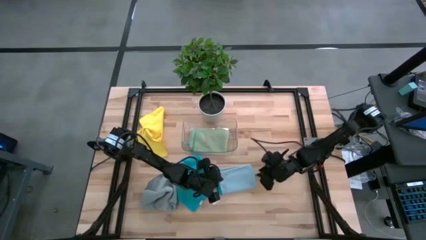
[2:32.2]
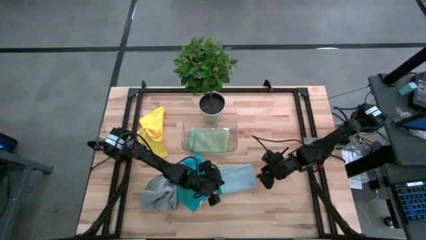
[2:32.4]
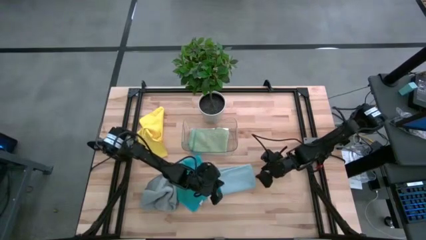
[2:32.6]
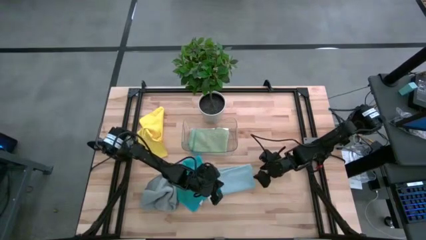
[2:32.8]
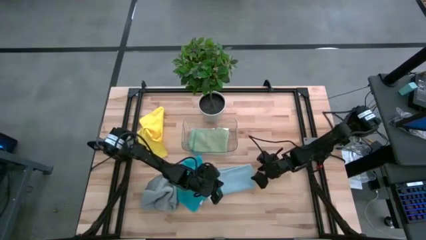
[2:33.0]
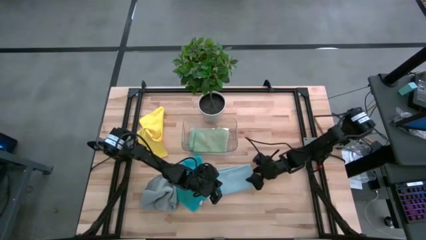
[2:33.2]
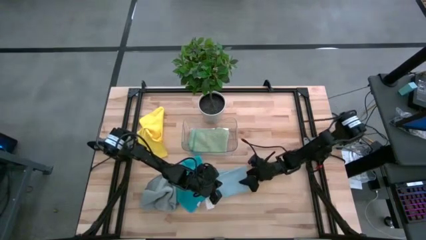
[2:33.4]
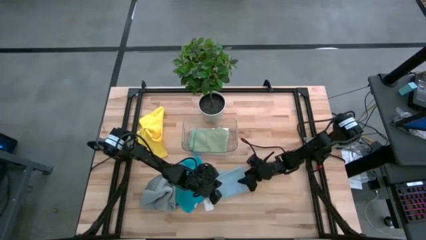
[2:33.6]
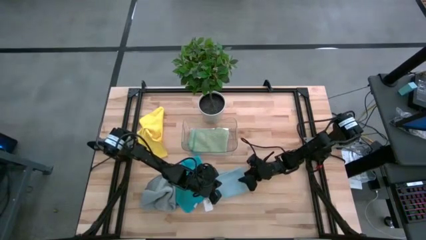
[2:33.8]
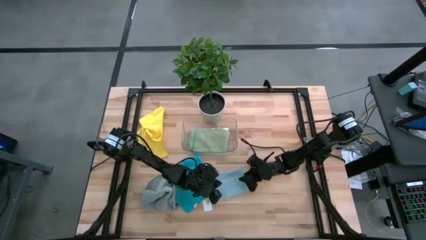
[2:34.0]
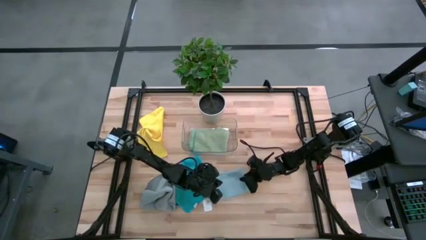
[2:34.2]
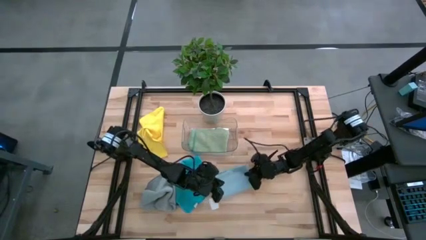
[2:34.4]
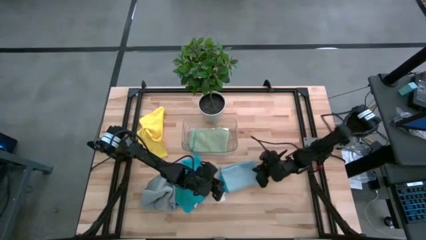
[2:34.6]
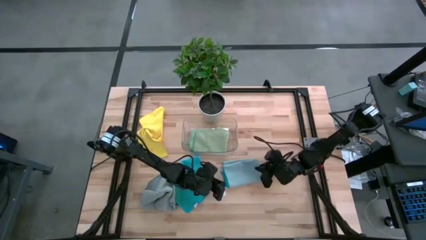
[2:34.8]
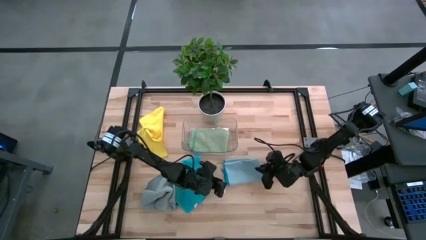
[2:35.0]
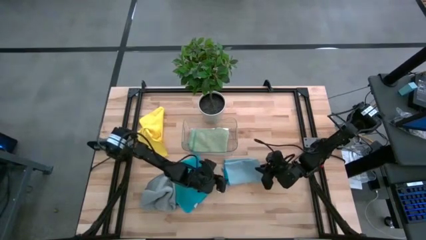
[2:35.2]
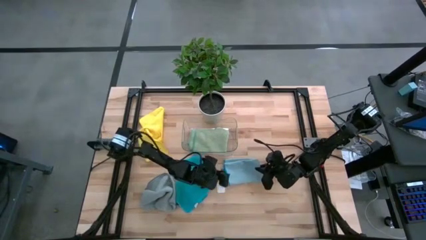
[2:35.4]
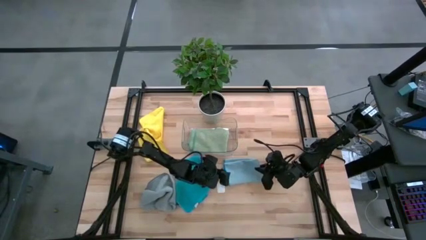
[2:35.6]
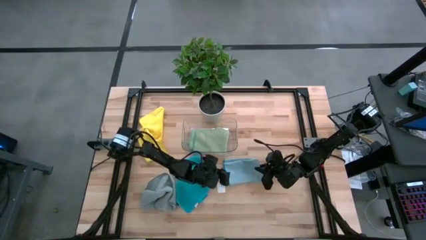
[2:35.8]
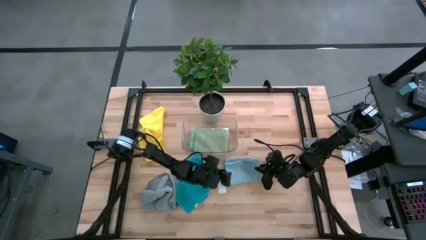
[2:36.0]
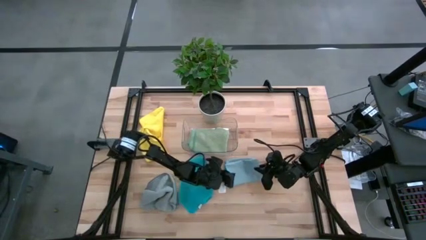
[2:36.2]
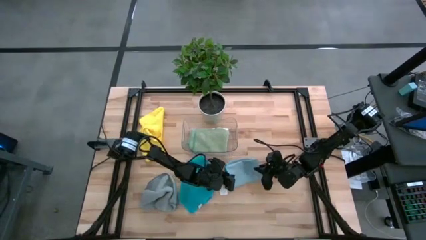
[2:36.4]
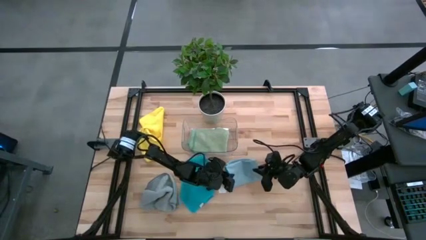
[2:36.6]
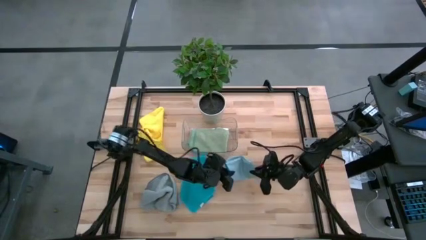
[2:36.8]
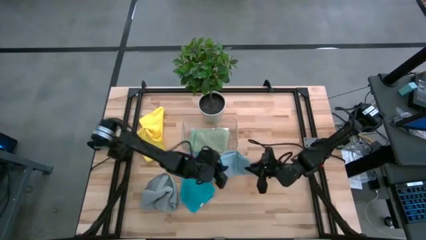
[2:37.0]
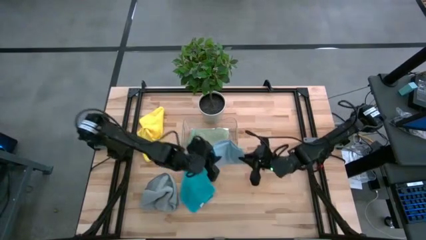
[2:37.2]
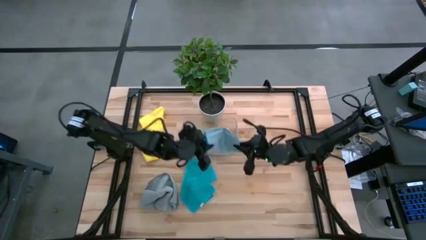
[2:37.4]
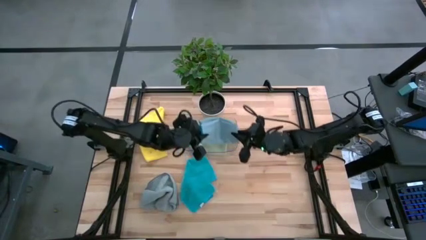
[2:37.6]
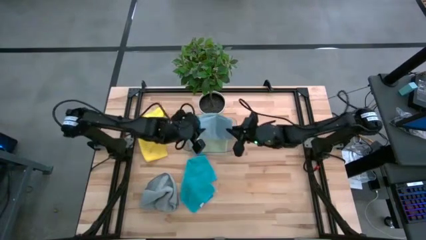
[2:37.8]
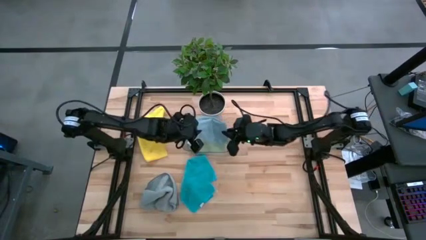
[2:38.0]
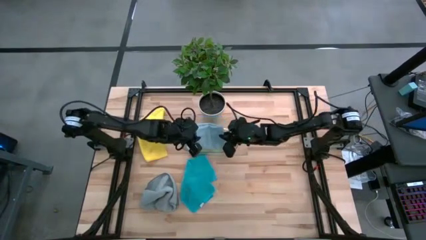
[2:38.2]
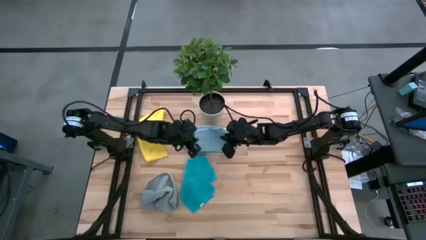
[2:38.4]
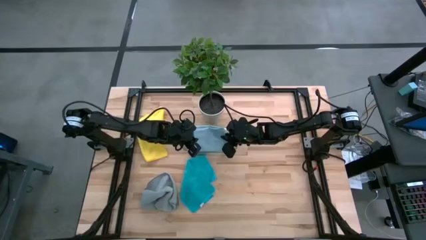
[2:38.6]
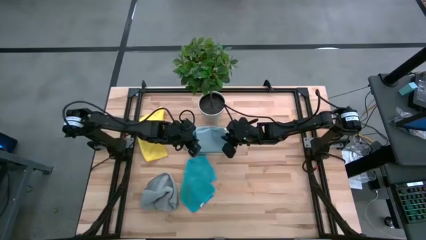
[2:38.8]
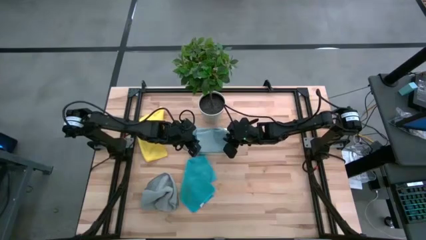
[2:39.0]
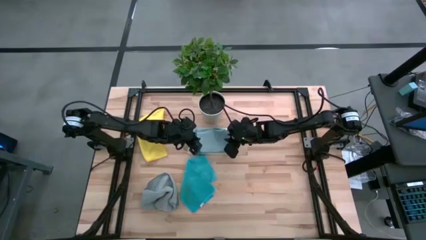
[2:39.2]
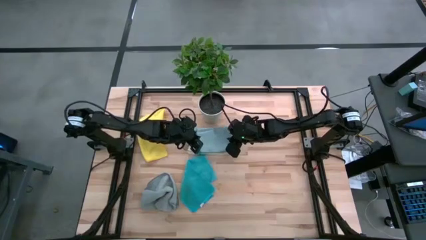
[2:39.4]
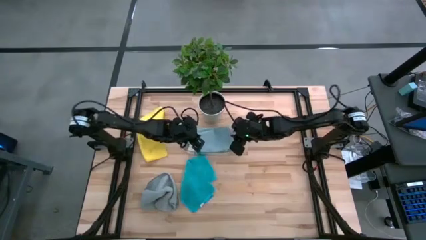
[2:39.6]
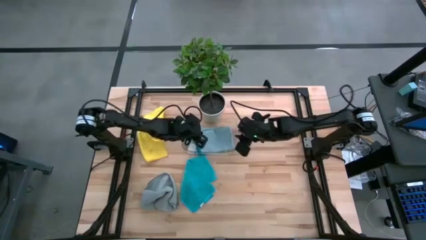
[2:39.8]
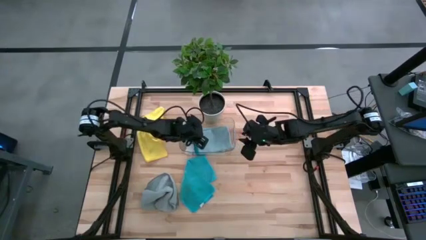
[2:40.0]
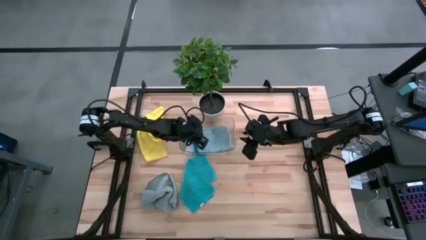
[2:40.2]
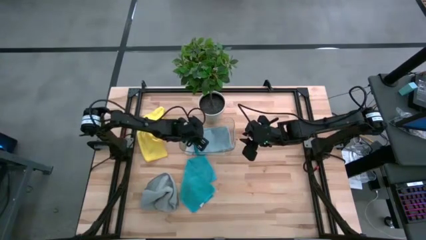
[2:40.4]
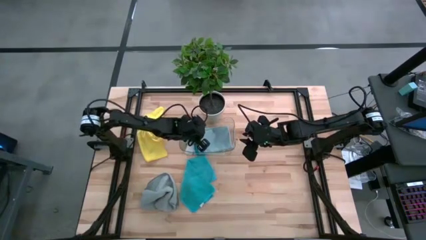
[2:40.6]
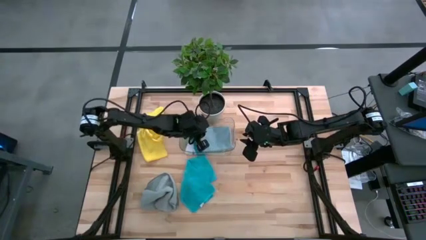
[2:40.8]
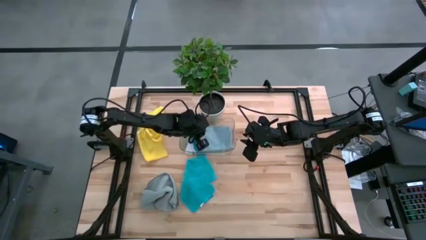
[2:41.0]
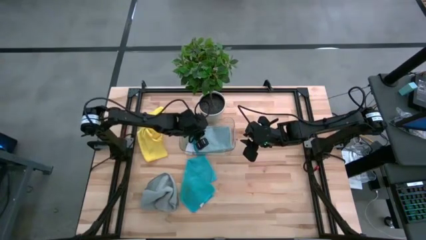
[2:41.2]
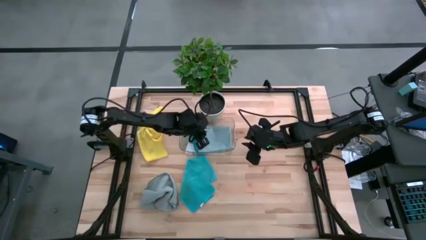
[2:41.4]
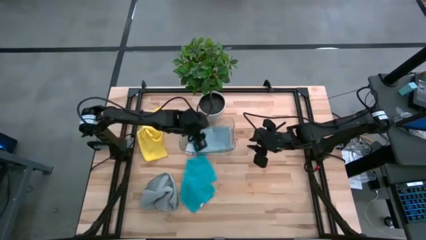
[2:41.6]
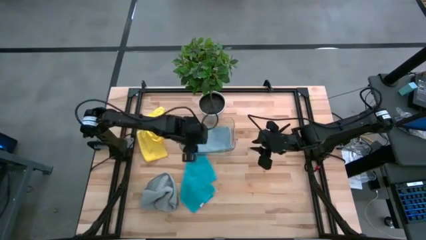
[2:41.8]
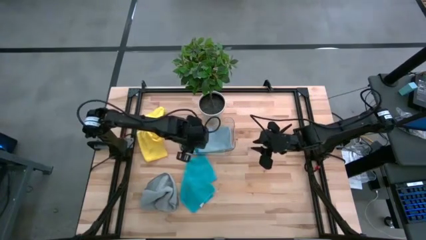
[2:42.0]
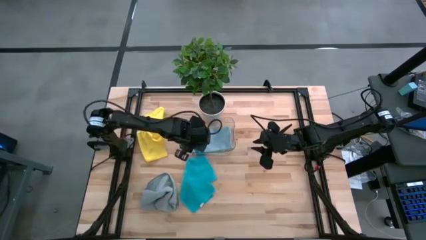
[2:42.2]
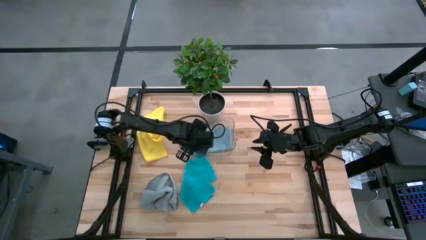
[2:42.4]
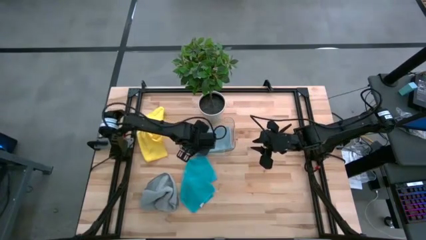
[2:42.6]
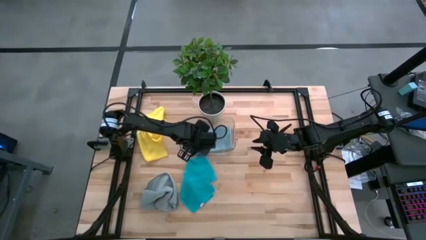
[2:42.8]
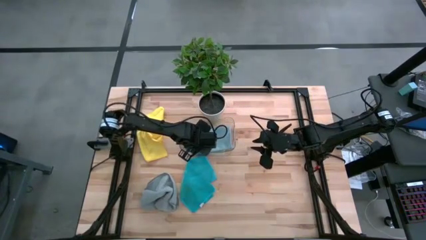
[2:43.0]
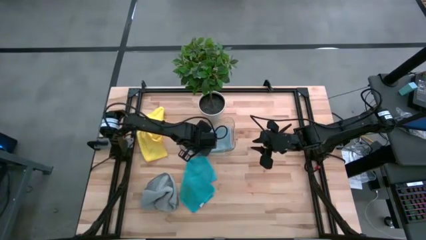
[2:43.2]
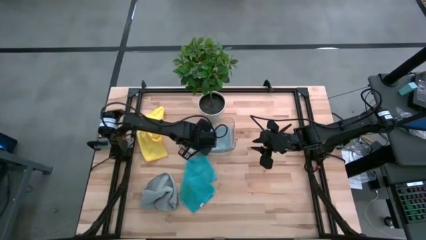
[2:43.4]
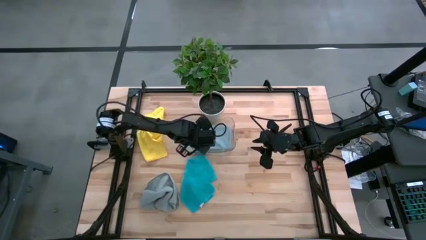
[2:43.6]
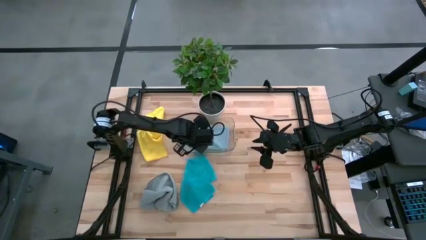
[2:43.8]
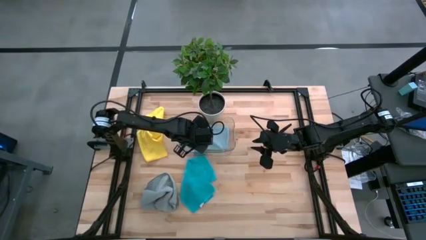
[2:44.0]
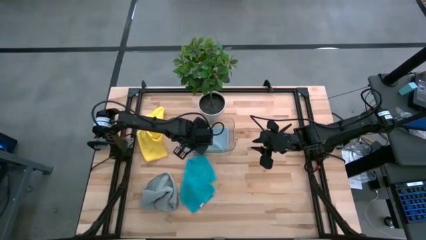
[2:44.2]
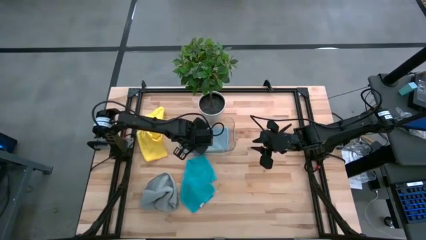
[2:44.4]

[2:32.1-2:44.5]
Task: Fold microfiber towels
Stack the folded light blue microfiber cloth on top of the folded green microfiber cloth
